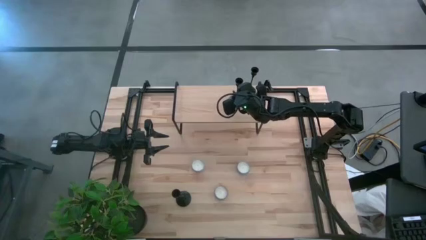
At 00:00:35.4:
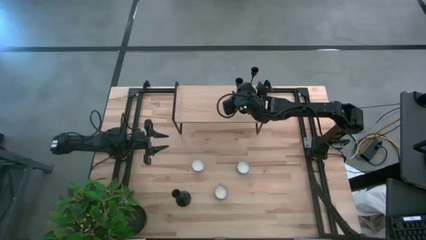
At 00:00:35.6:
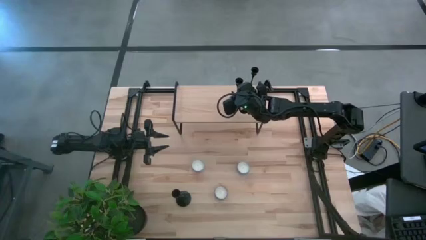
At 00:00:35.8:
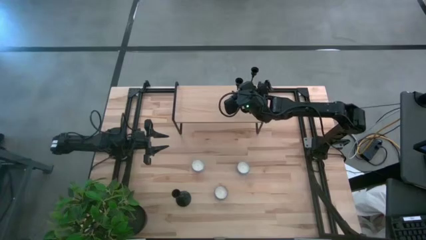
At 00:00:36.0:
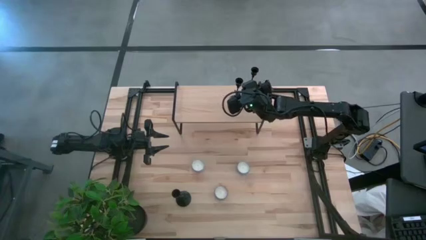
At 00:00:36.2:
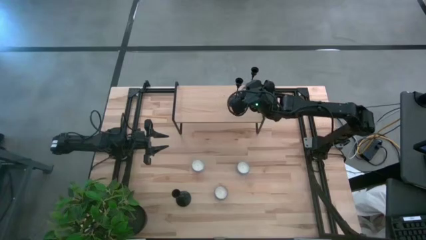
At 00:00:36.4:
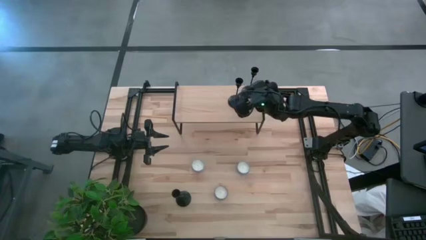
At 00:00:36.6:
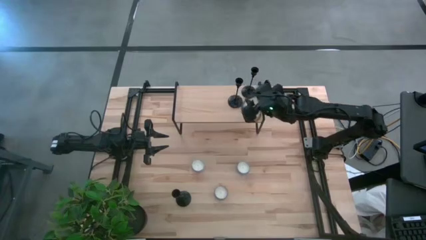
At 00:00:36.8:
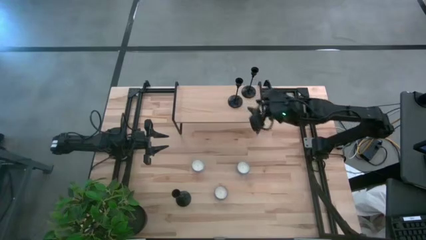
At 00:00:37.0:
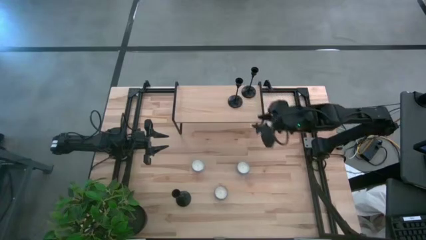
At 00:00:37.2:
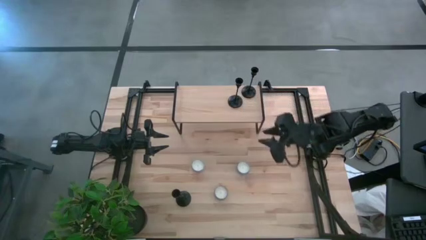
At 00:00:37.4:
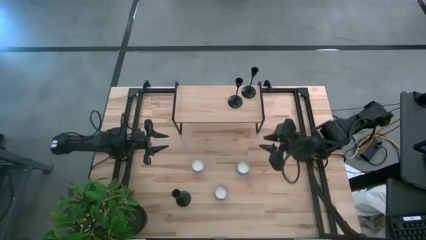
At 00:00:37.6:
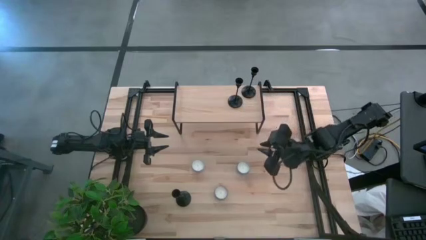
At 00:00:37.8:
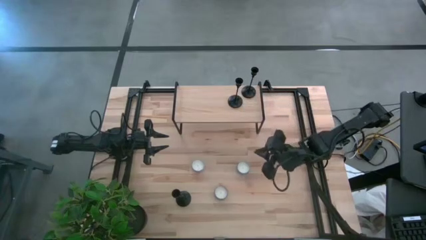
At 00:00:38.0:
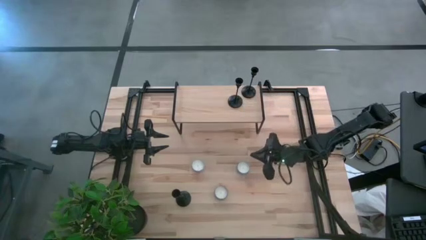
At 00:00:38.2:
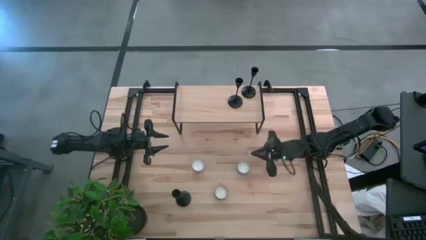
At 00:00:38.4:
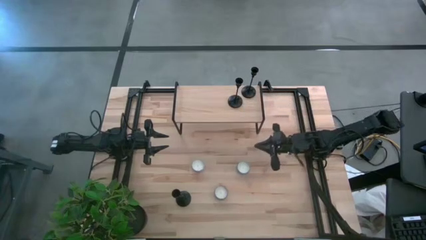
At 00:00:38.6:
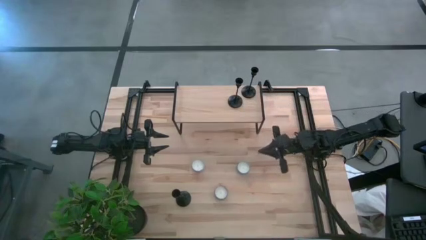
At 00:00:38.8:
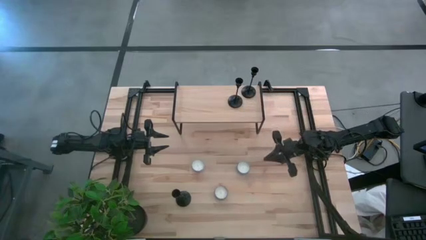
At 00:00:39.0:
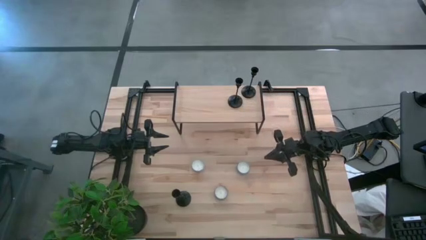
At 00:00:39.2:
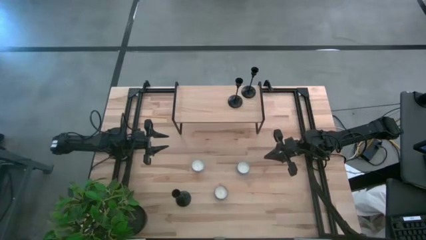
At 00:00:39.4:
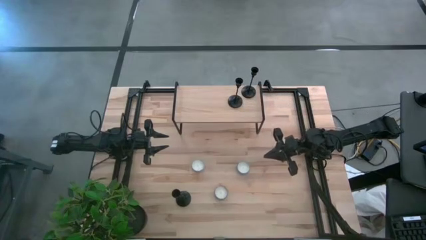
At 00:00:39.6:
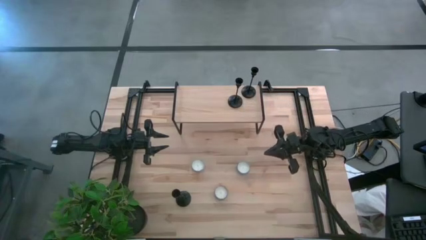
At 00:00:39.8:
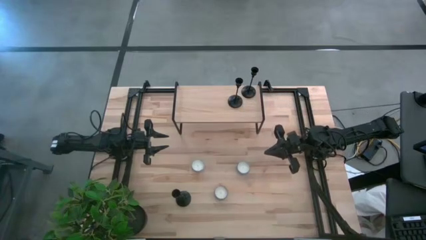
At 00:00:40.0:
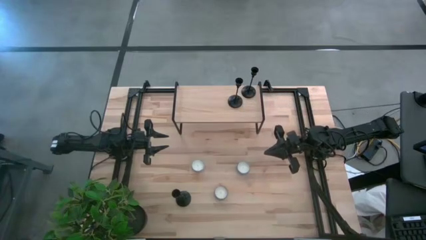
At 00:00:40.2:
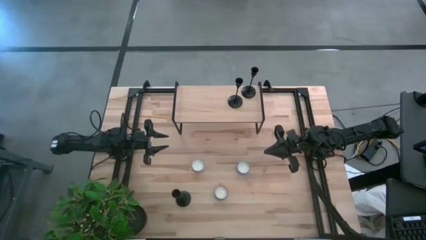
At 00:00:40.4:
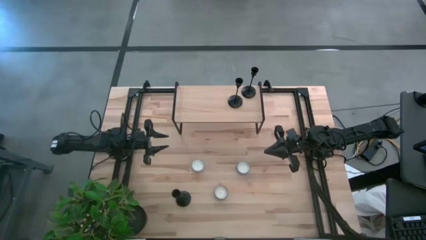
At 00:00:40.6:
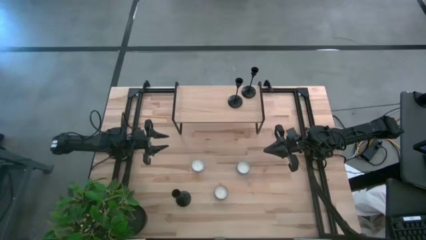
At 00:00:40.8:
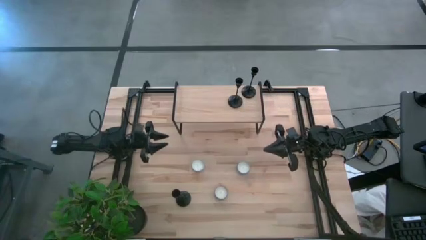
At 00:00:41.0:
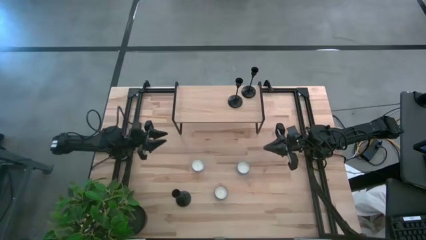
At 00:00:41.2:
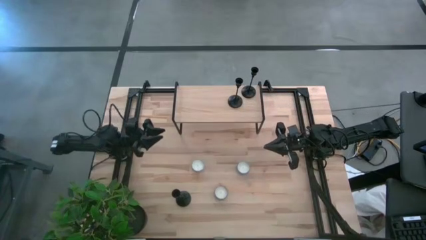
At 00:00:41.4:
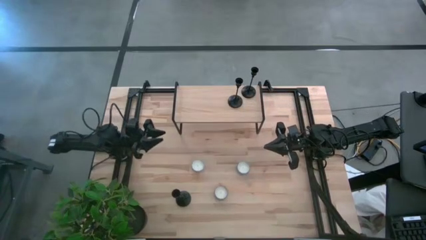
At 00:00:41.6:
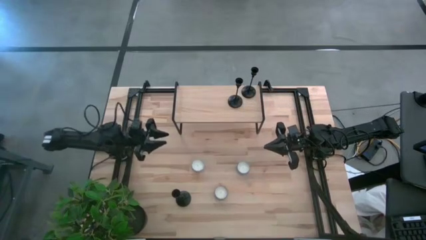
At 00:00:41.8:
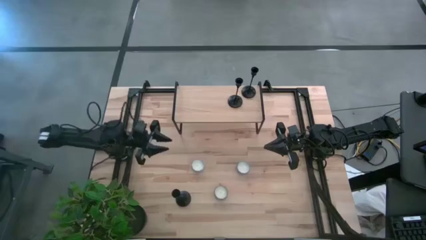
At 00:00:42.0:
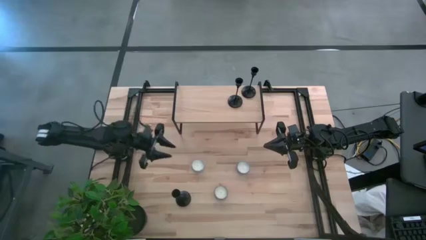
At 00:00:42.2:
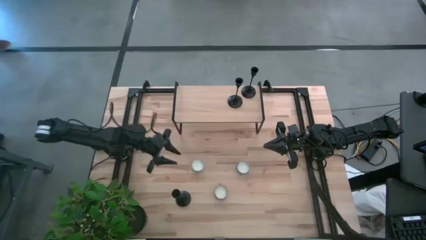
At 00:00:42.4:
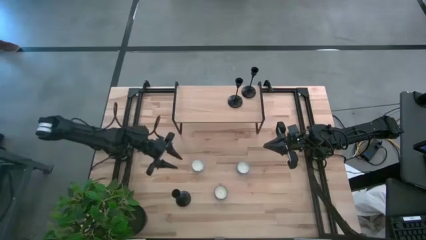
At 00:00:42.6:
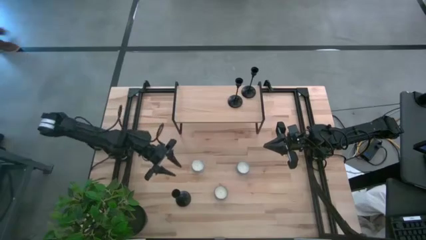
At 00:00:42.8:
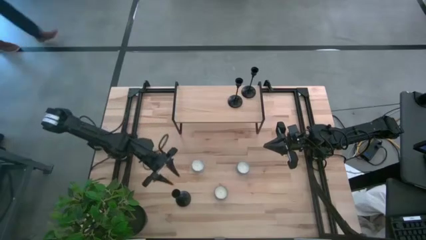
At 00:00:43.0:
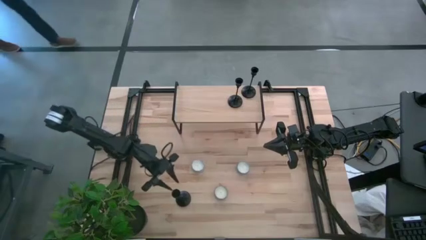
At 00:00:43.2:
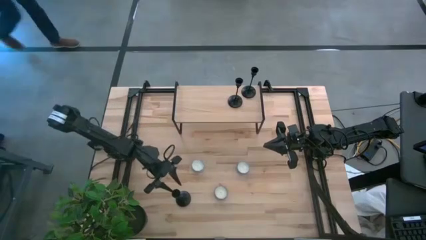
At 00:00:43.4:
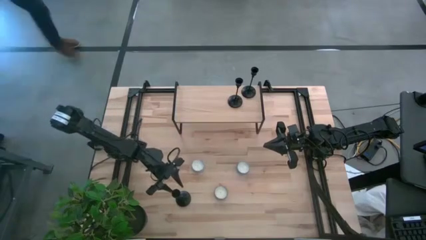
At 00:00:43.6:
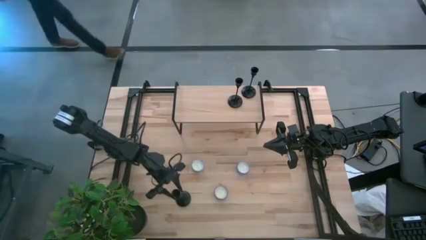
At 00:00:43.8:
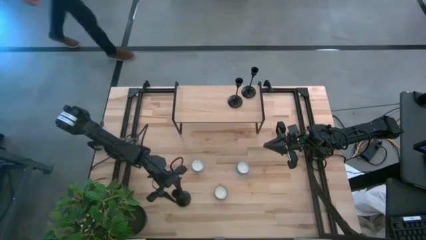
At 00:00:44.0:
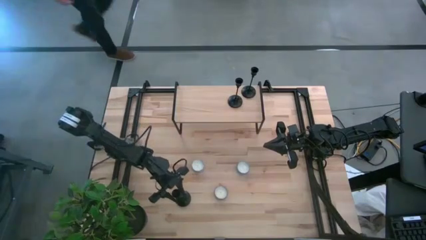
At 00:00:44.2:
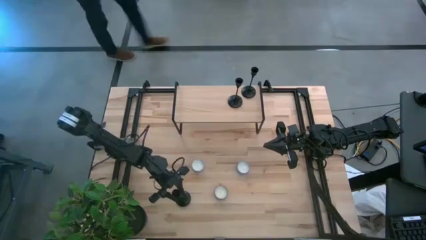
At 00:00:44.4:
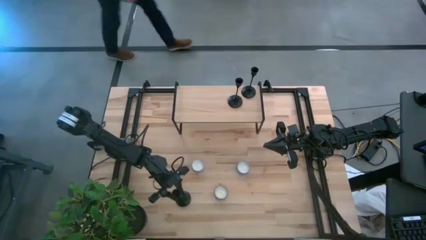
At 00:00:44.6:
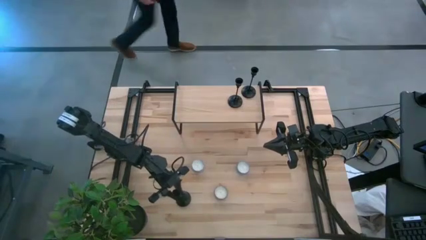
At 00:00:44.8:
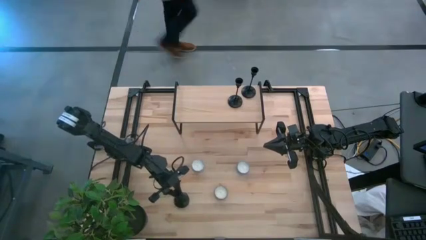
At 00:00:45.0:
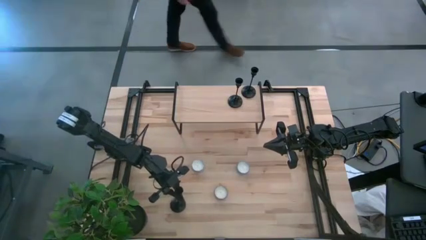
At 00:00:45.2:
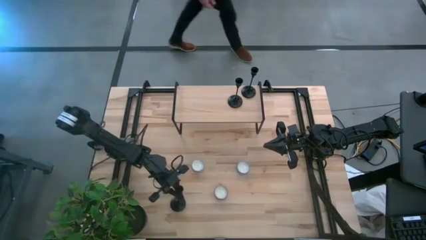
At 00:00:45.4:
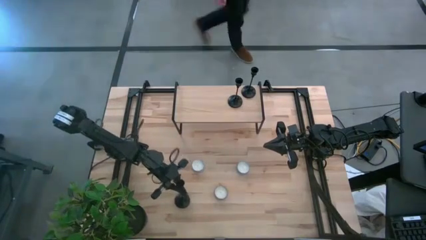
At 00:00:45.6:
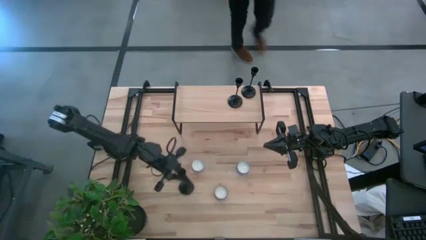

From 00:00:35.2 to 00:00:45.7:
Task: Pick & Place candle stick holders
Put the black candle holder on the shelf
